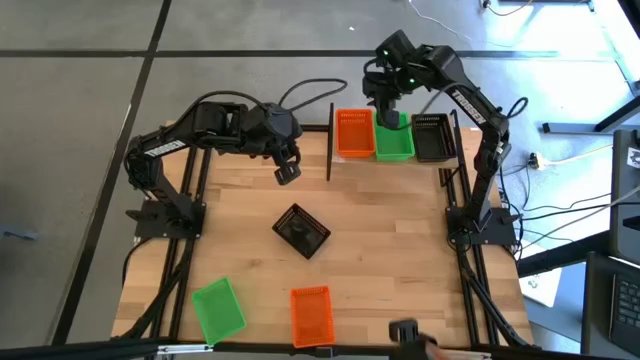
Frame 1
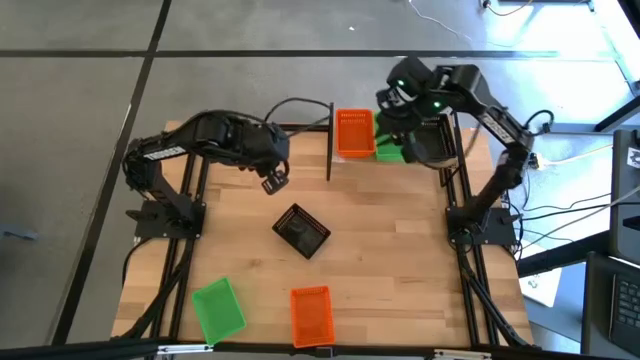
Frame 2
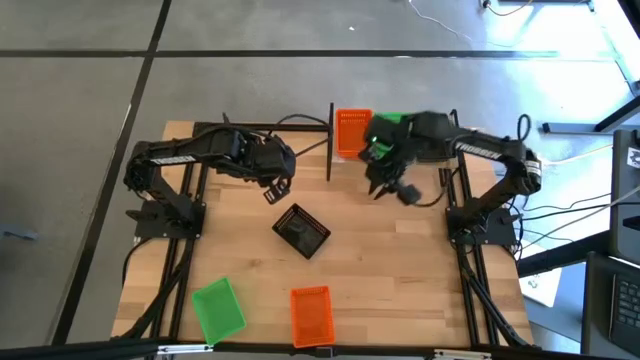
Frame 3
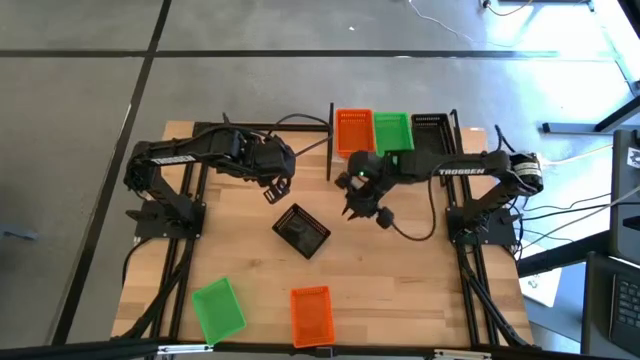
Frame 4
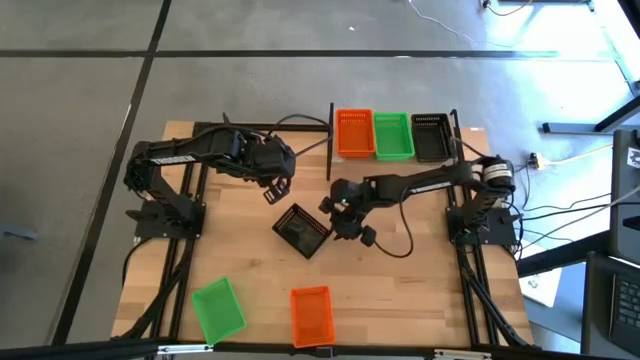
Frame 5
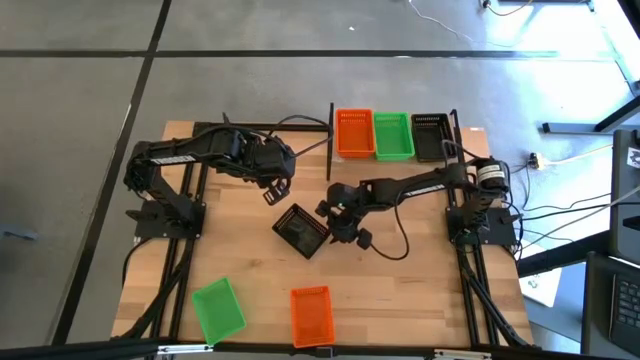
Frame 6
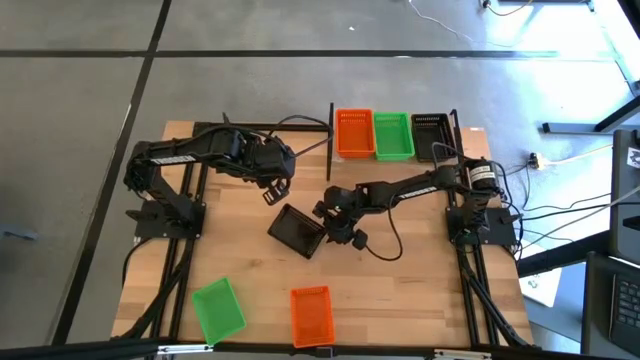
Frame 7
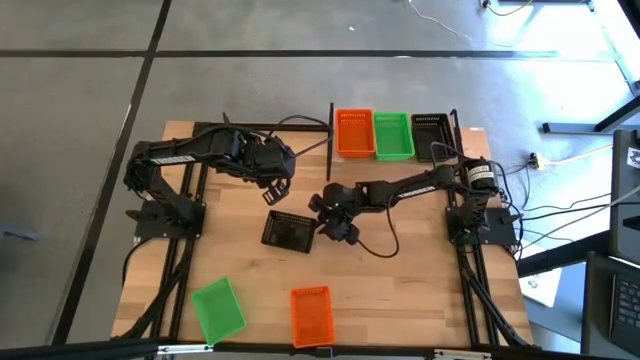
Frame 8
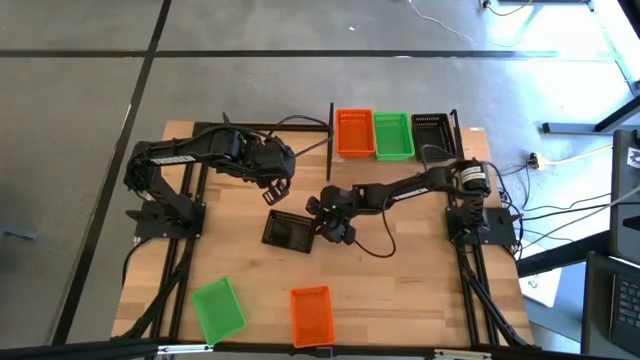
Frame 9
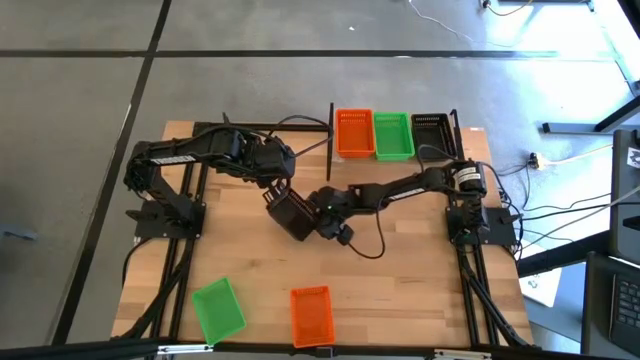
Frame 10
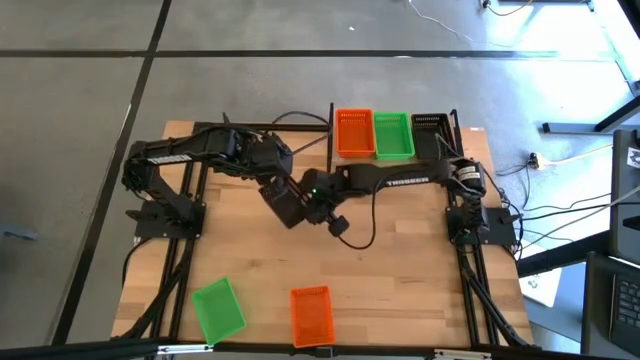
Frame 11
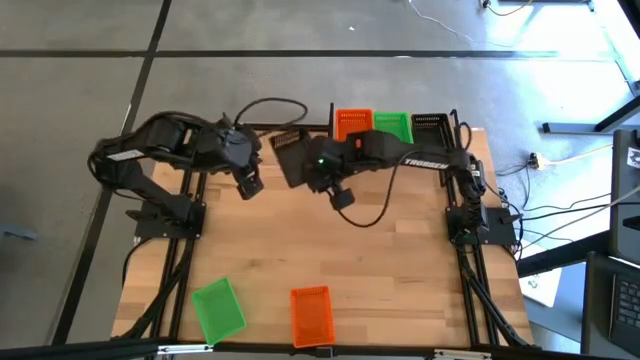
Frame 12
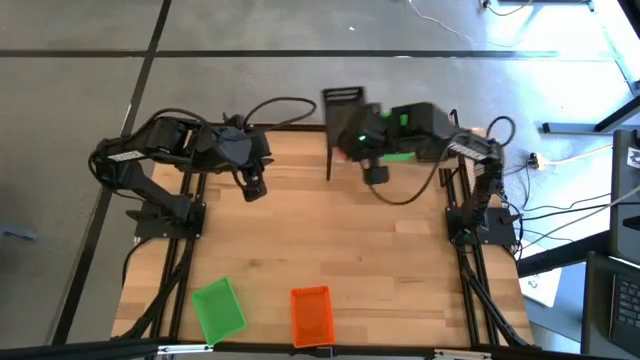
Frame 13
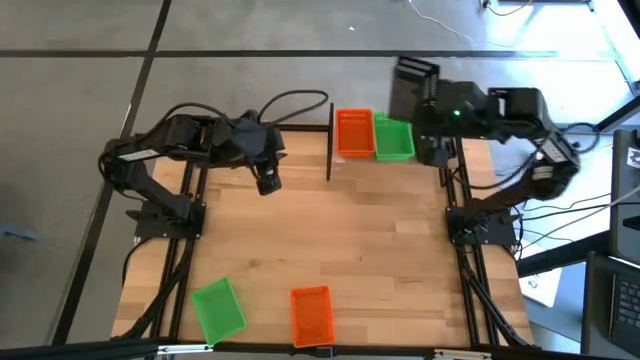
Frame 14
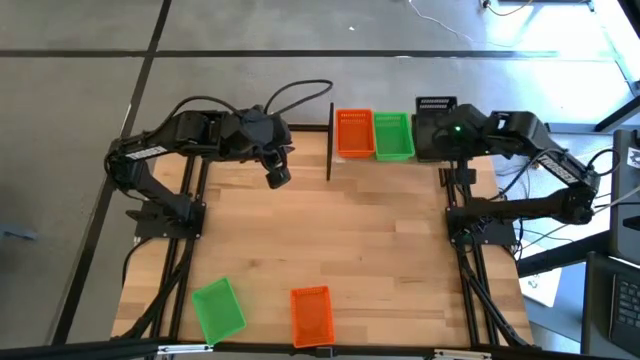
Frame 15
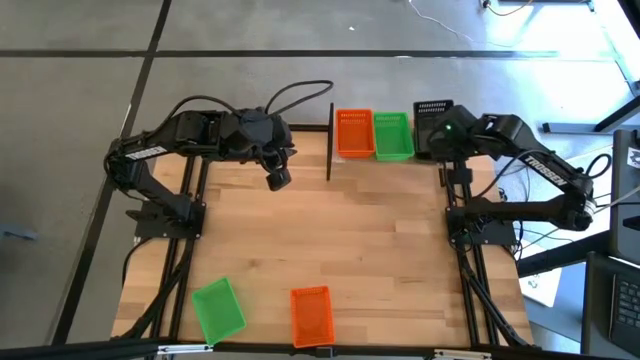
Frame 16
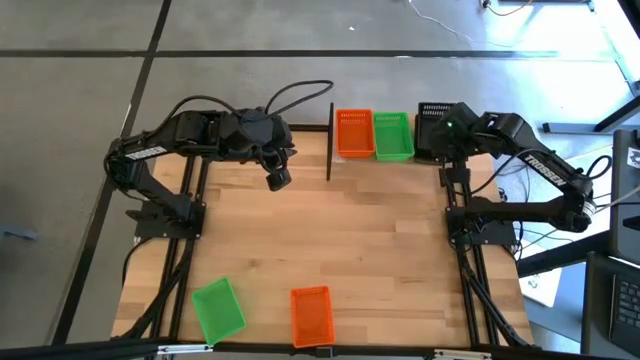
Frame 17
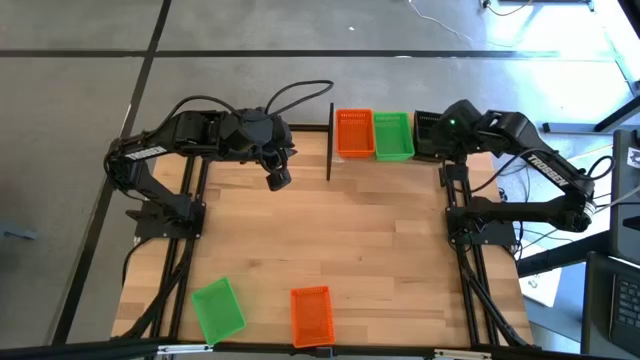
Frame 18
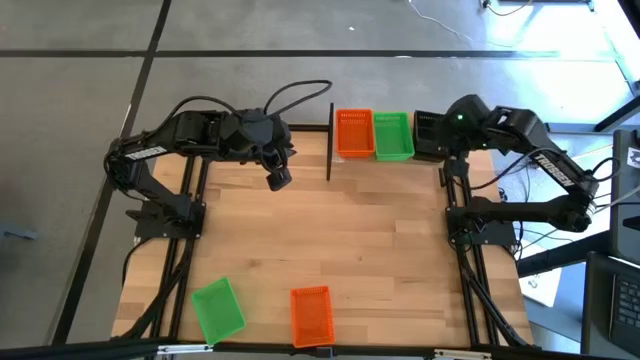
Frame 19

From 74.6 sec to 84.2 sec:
Task: Stack baskets on shelf by color
Stack the black bin on top of the black bins on the shelf

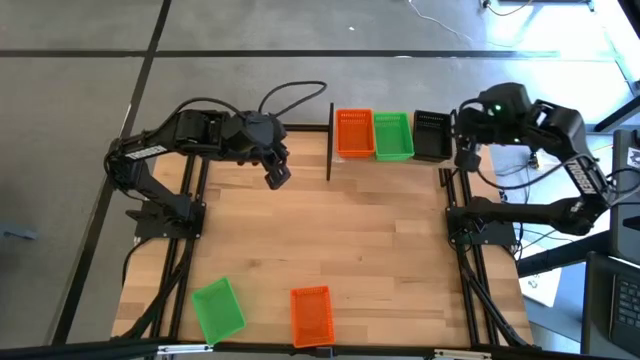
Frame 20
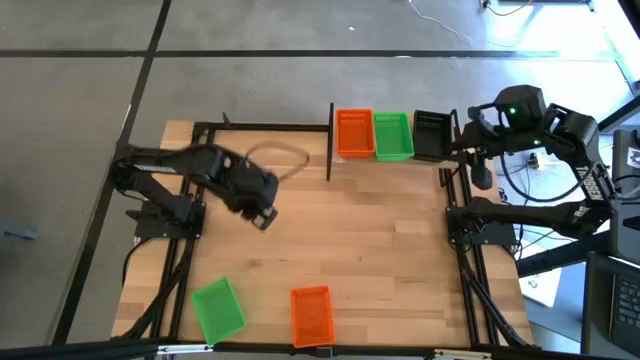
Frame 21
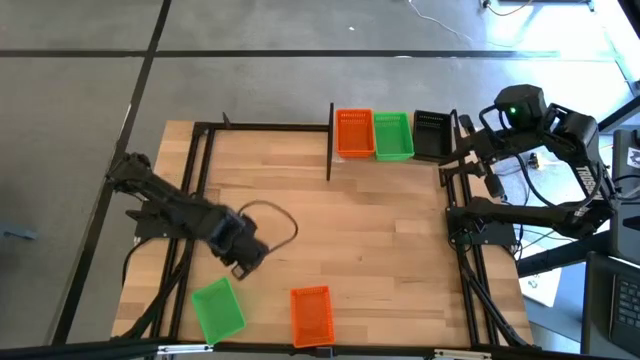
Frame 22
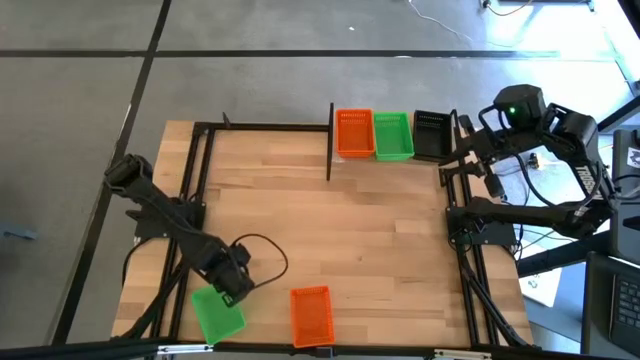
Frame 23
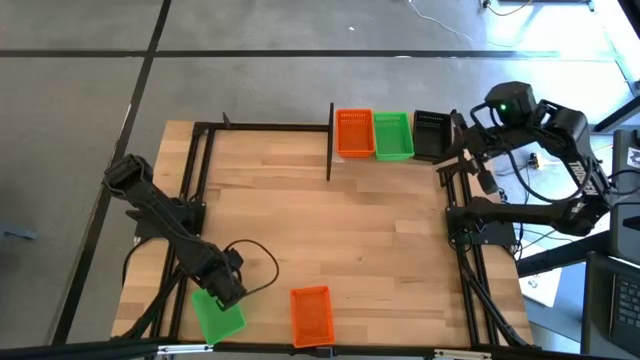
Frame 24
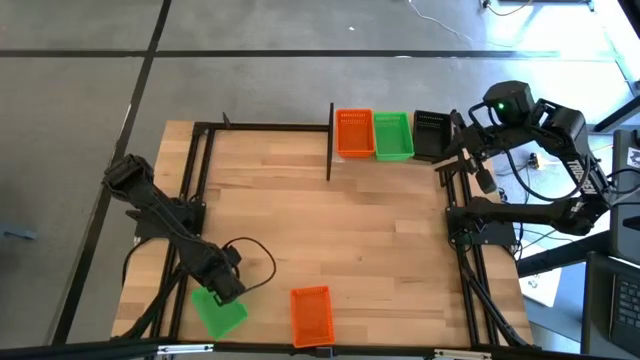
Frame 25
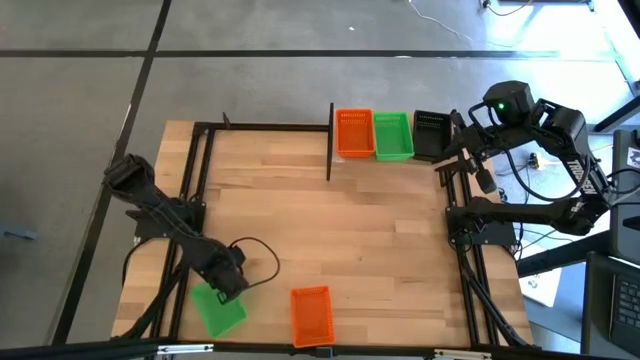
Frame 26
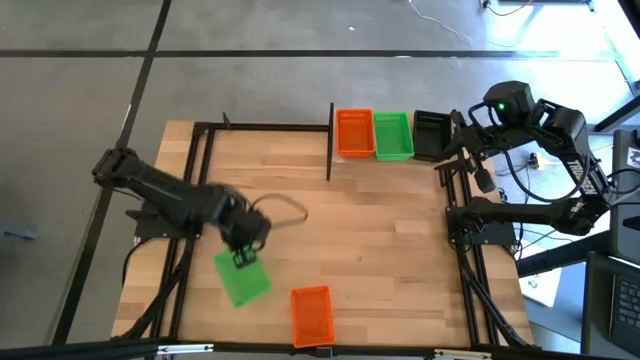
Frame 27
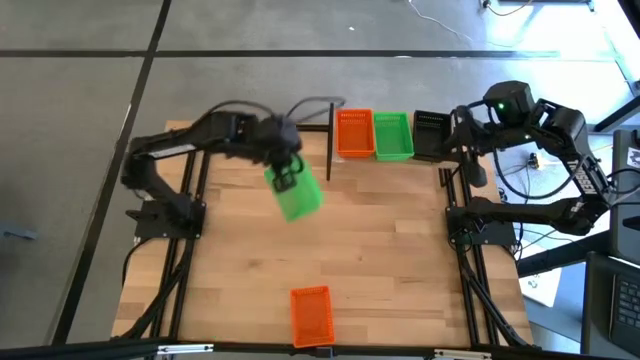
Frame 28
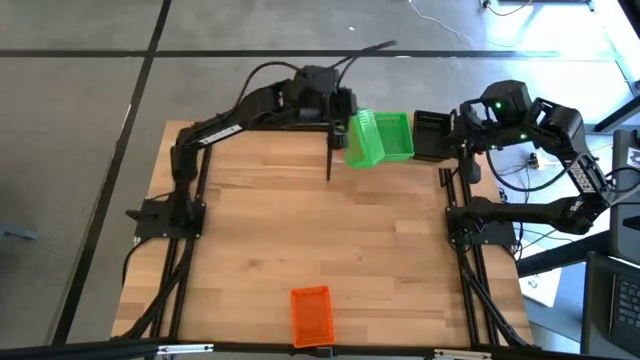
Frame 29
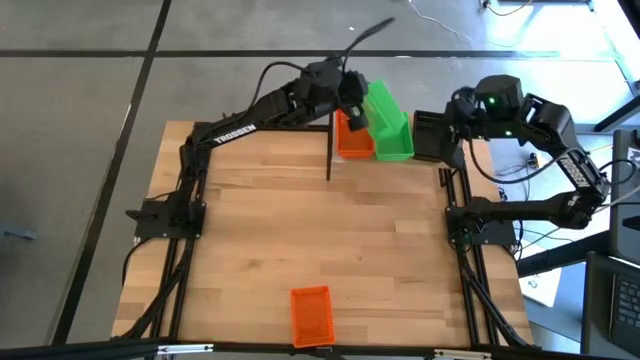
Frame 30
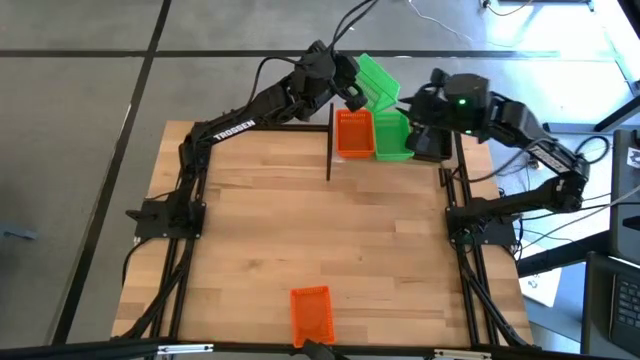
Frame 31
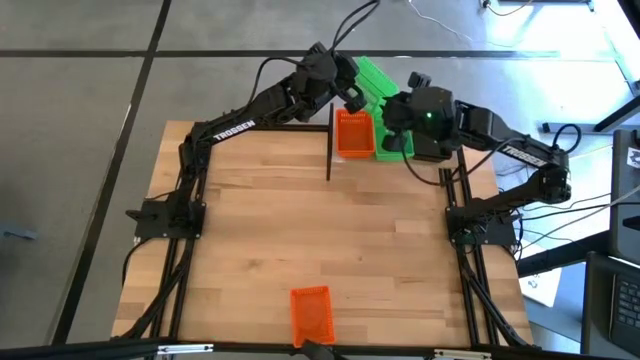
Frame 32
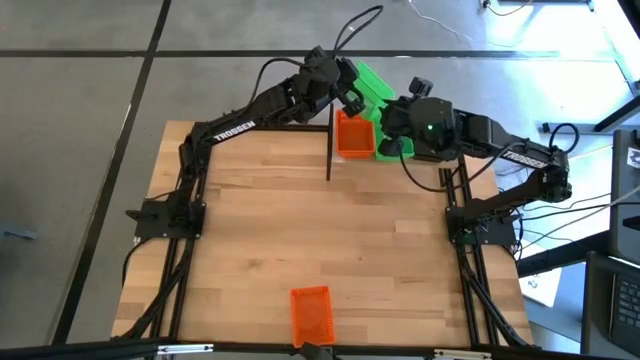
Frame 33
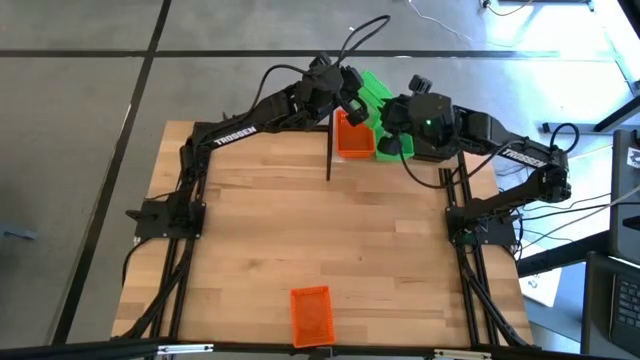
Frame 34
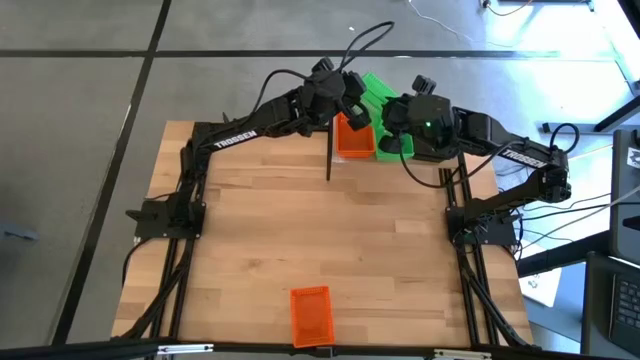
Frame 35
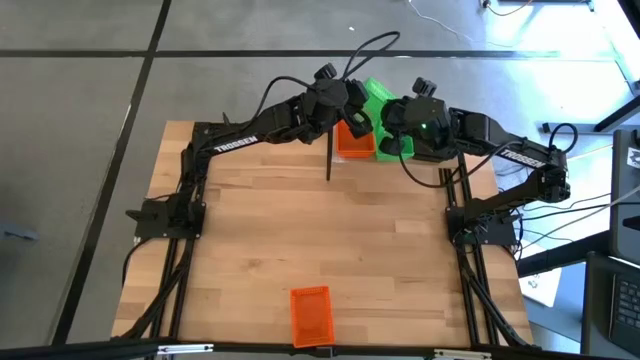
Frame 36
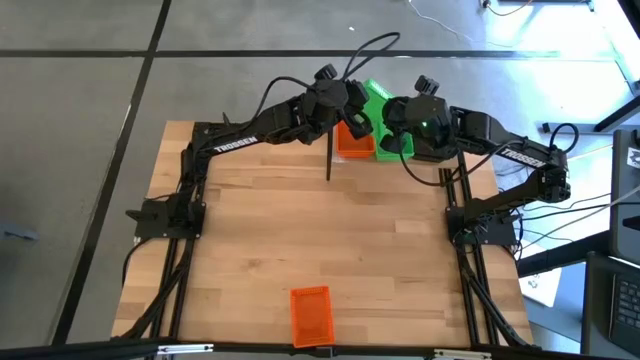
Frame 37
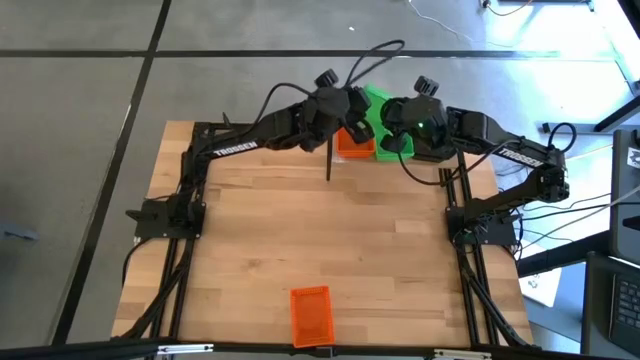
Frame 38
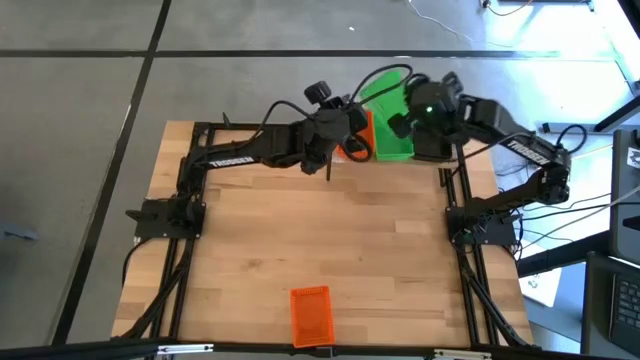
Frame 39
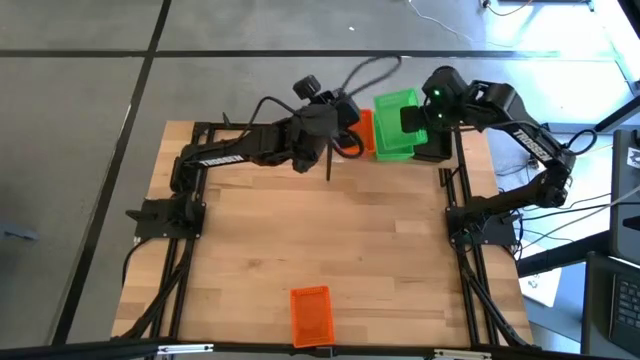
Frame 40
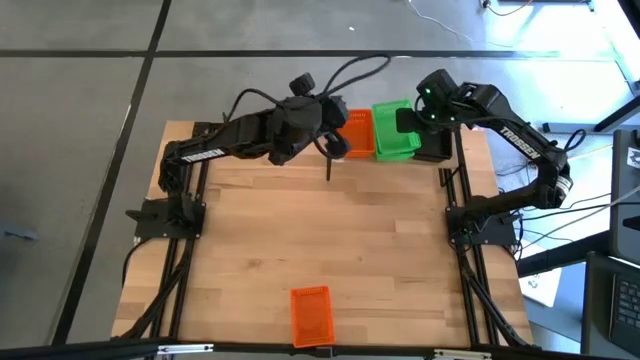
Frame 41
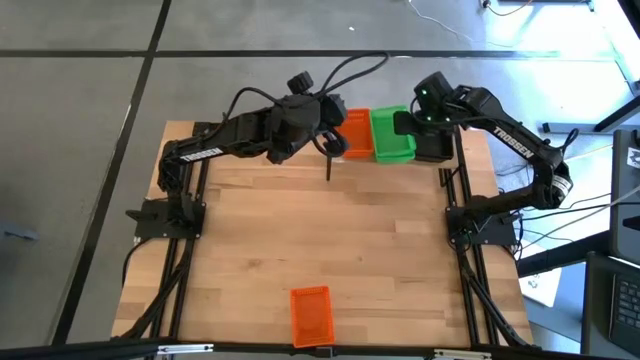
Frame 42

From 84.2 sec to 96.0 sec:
Stack the green bin on top of the green bins on the shelf

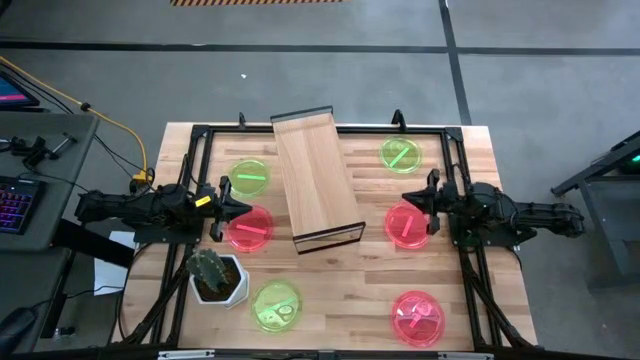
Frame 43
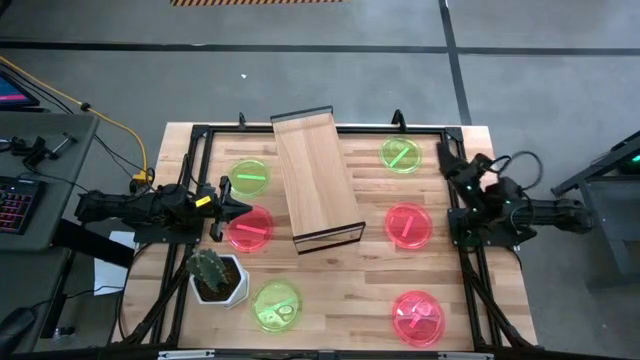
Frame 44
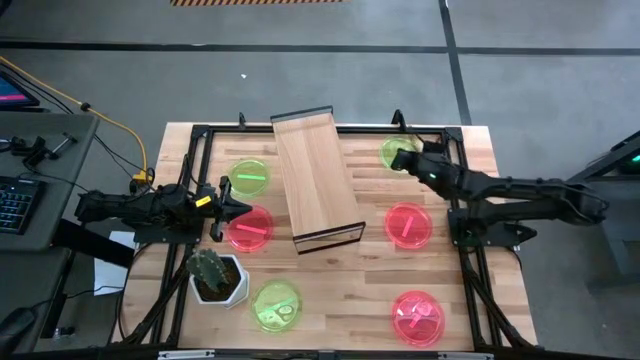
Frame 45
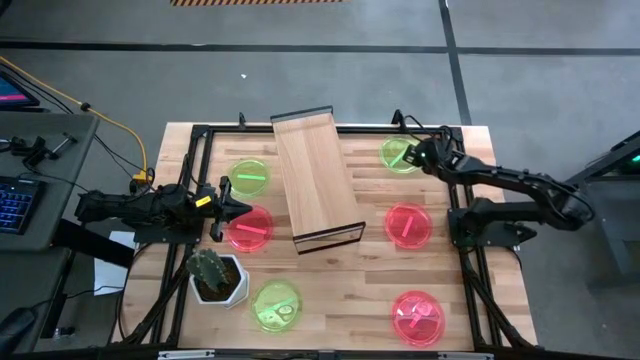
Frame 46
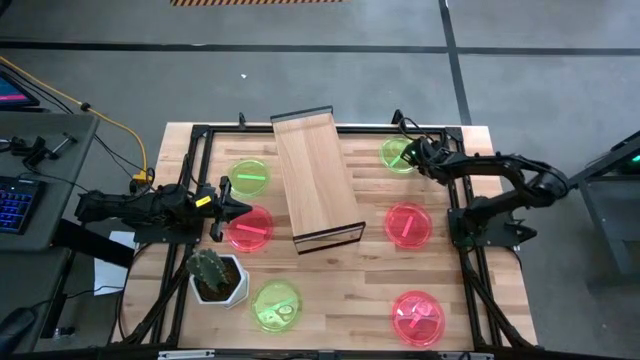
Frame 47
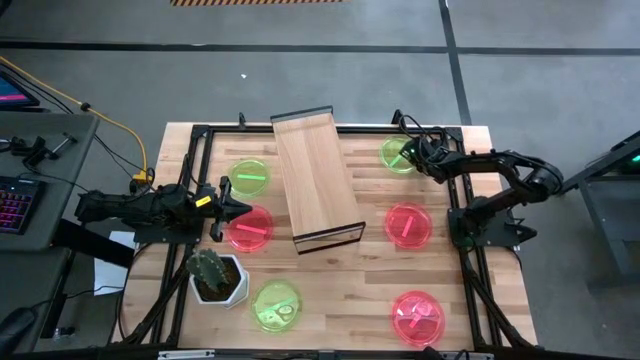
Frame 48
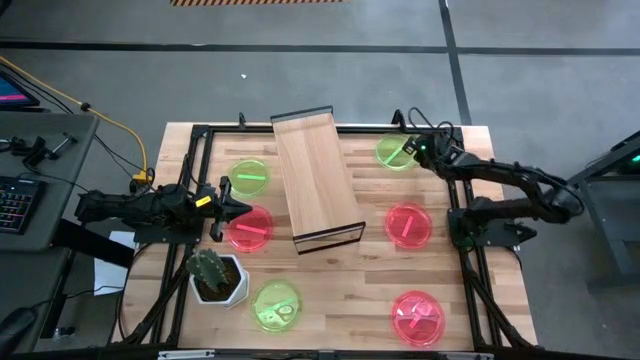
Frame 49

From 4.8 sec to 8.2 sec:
Task: Place and stack plates onto a shelf
Put the top right green plate on the shelf
